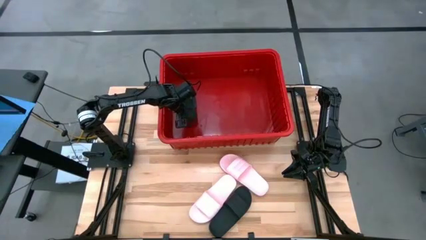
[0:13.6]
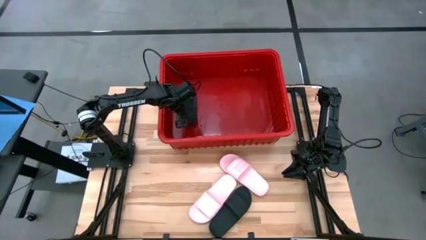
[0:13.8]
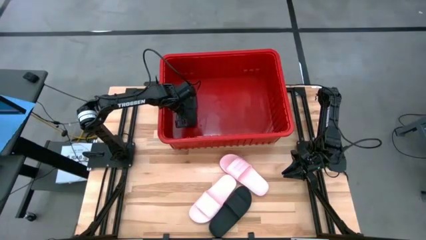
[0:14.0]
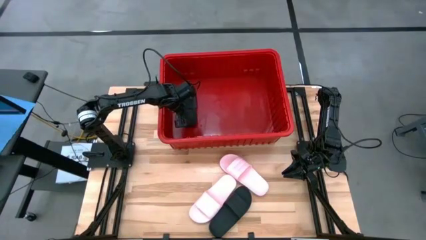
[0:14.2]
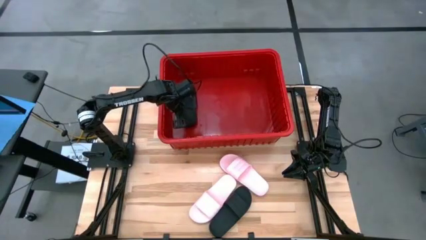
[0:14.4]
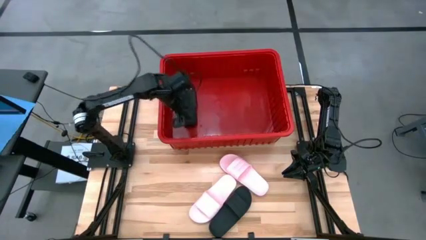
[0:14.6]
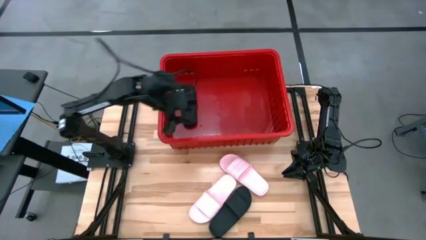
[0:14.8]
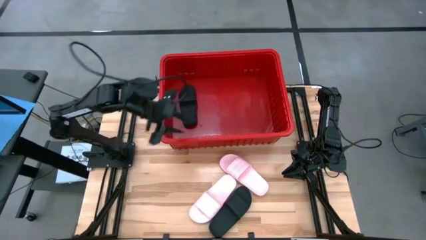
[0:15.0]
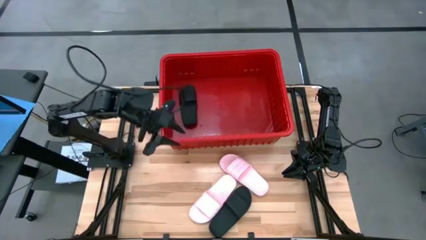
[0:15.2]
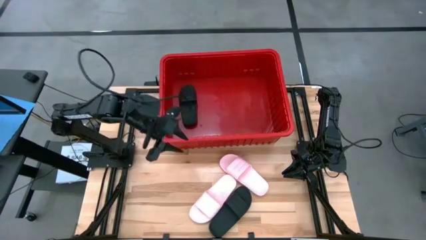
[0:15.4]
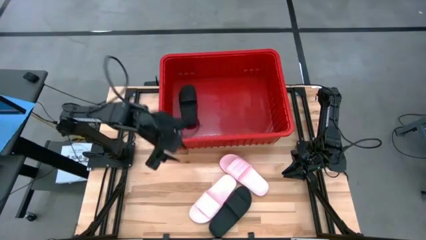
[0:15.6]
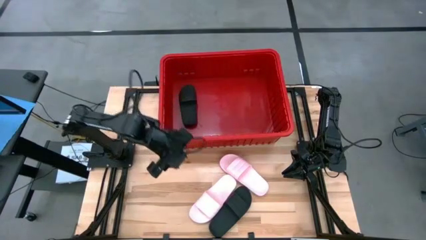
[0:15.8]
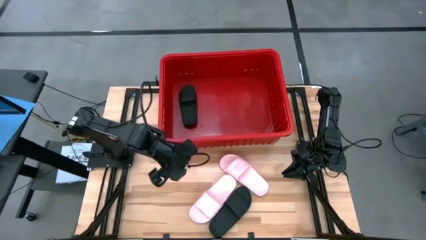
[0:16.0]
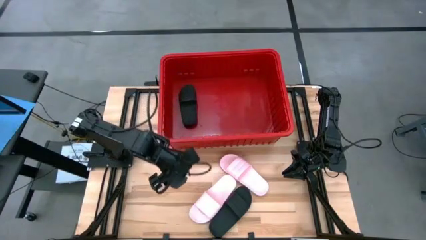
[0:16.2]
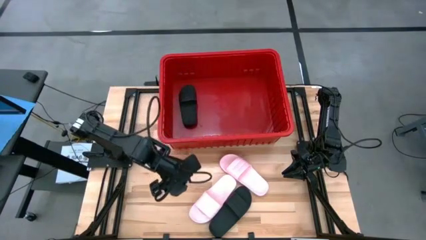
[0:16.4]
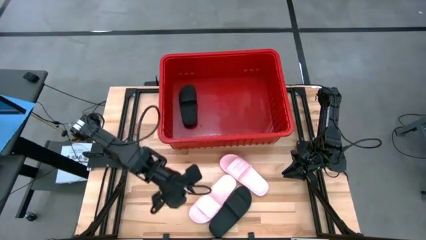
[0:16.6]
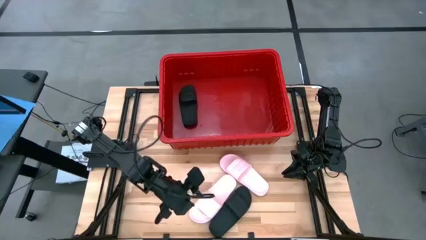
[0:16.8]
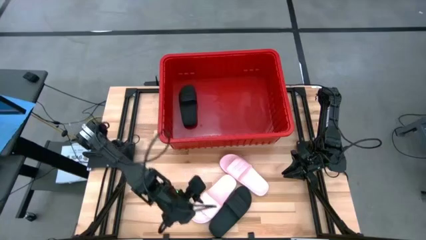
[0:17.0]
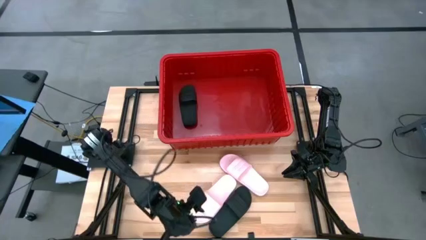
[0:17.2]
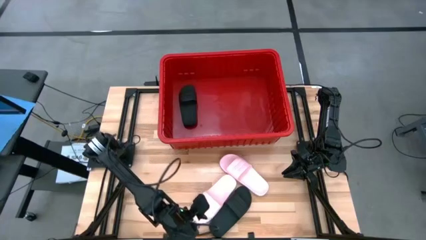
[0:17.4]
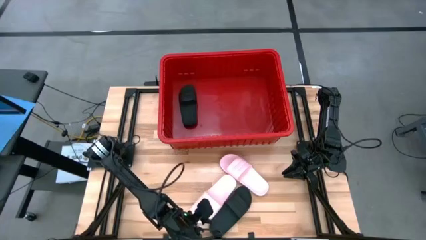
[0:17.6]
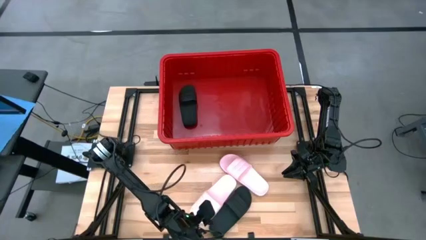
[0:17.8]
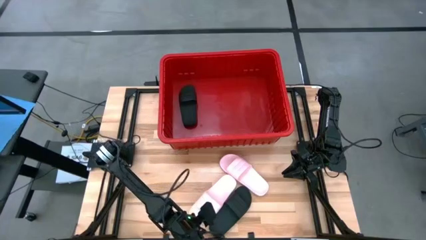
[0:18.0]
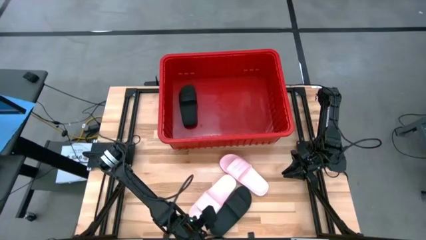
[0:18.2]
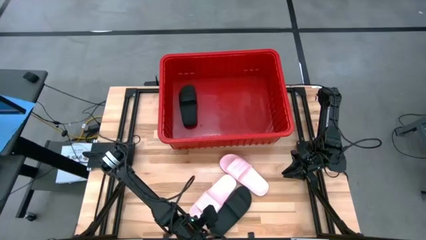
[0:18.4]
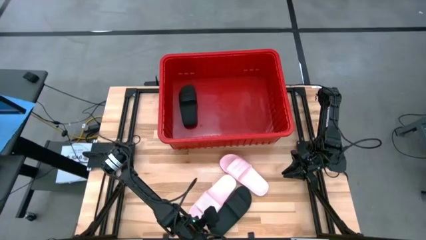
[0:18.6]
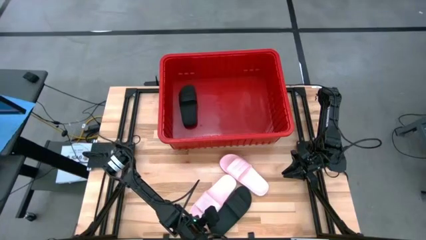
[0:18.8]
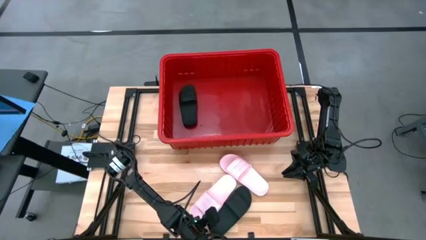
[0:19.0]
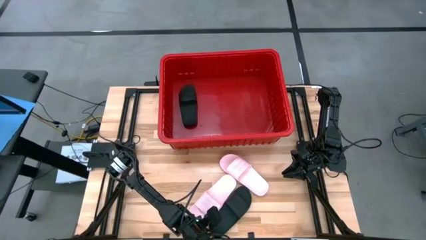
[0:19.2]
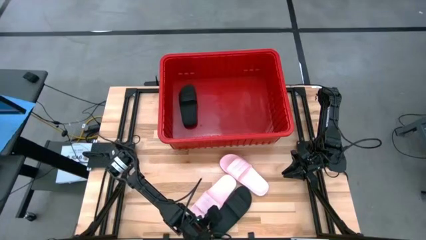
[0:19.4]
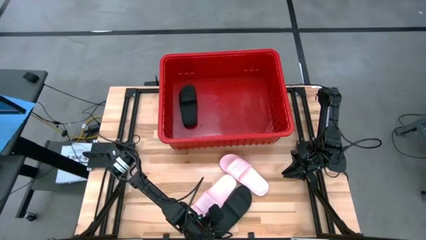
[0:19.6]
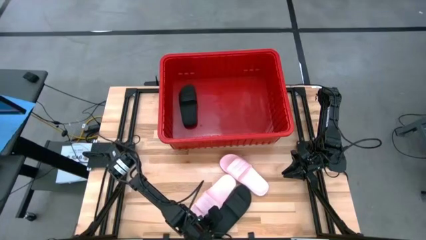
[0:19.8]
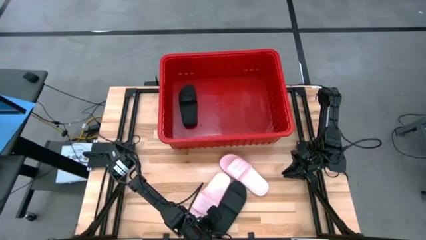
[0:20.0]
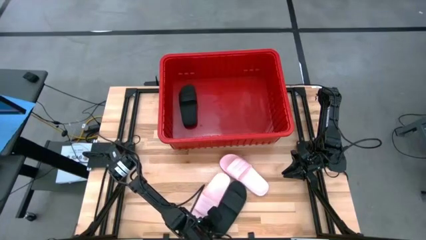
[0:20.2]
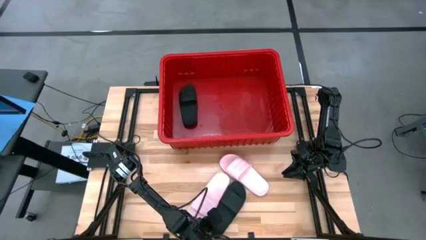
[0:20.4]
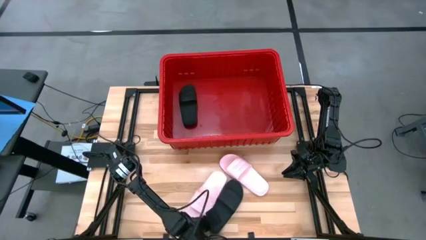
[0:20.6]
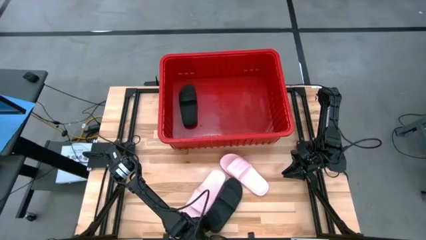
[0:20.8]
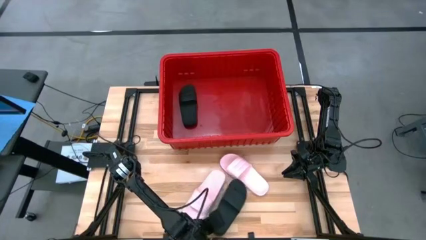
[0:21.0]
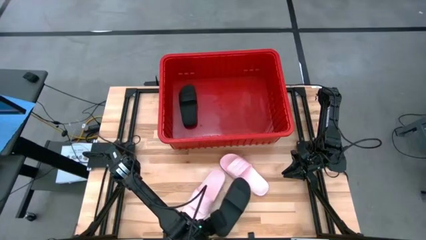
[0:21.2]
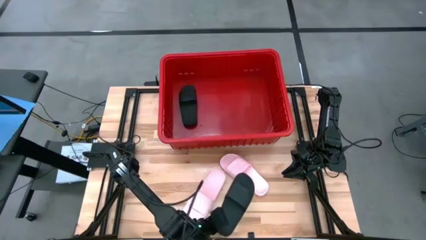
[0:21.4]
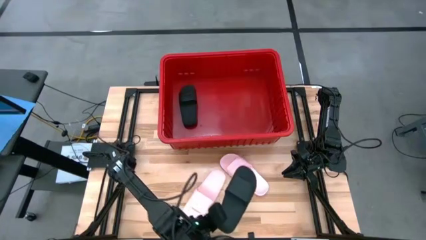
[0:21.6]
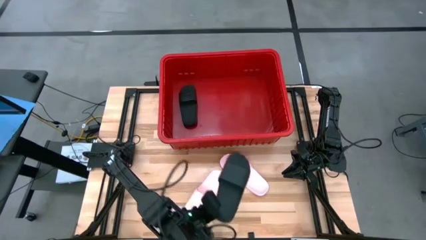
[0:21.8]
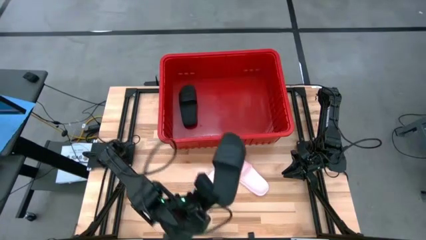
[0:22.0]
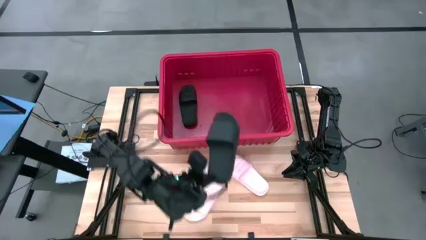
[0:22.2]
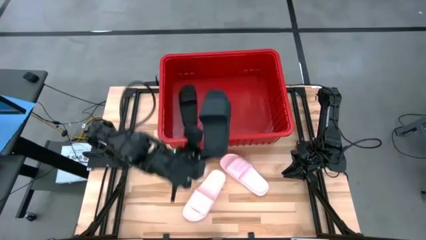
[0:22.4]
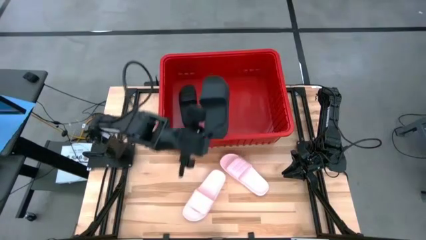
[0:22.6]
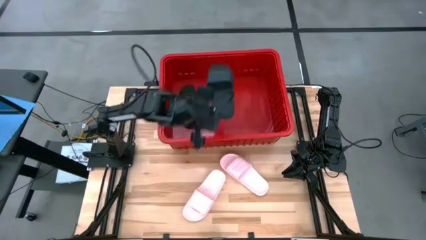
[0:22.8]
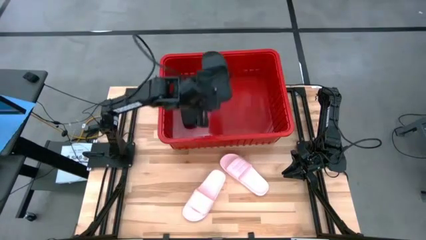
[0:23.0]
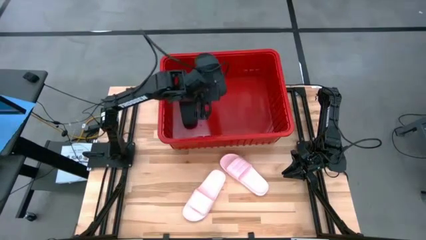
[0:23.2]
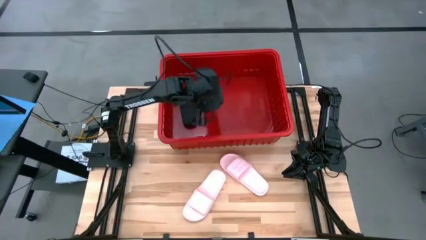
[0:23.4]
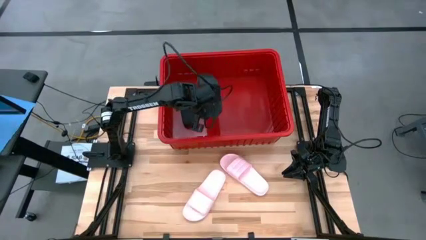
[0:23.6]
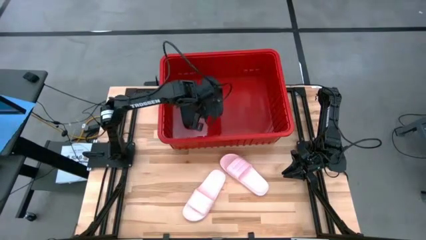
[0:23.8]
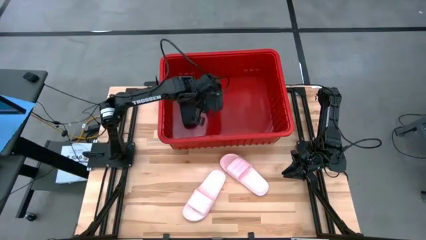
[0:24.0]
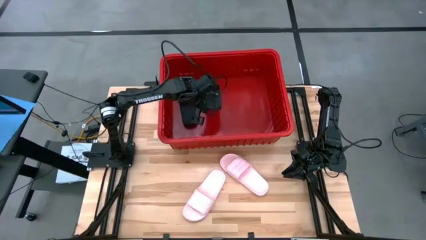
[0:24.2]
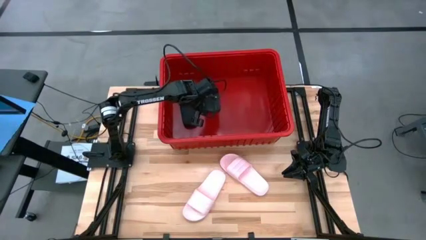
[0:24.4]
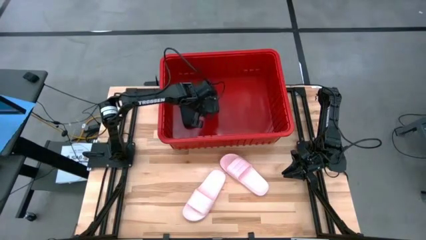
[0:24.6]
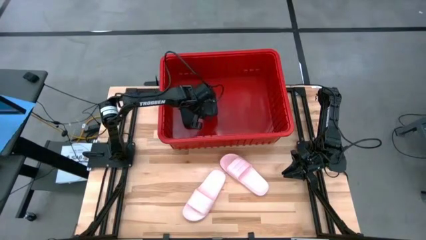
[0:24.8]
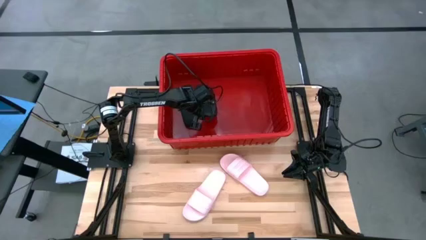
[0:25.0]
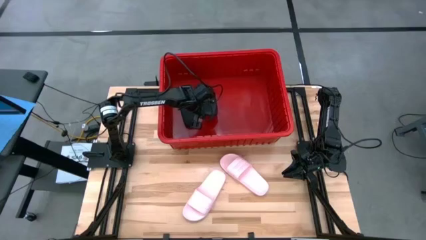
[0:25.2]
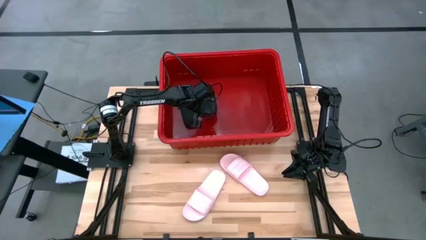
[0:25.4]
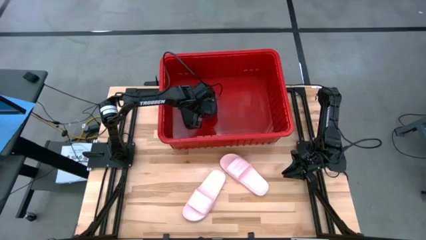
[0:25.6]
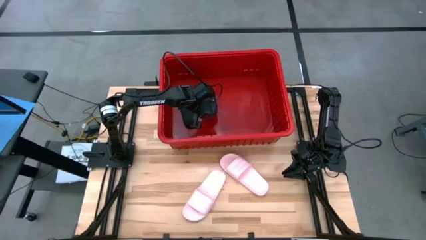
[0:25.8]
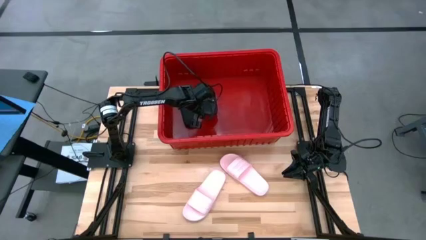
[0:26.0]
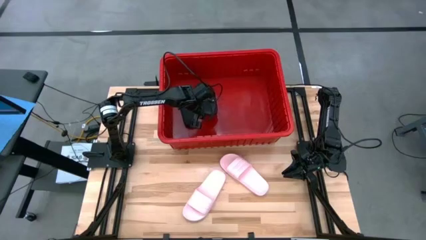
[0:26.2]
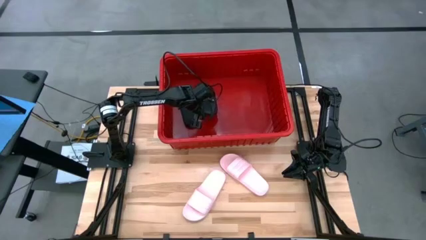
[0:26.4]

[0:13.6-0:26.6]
Task: Pick and place slides into bin
Put the black slide into the basket

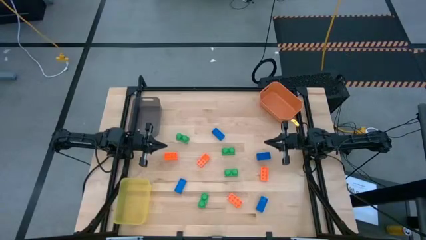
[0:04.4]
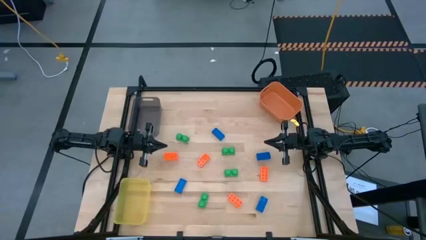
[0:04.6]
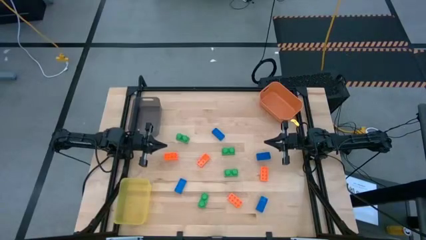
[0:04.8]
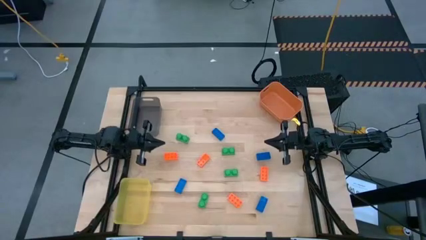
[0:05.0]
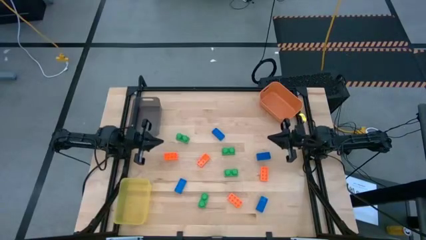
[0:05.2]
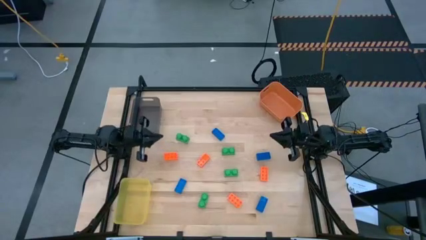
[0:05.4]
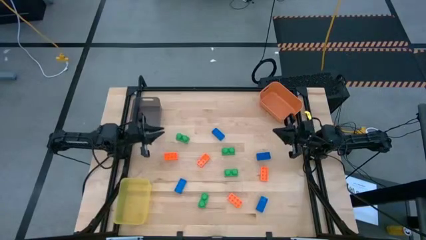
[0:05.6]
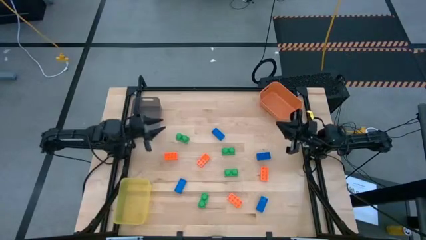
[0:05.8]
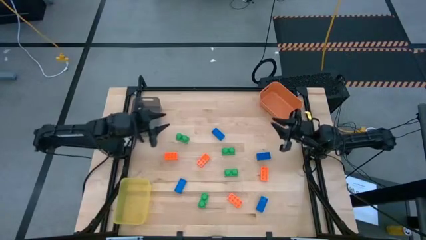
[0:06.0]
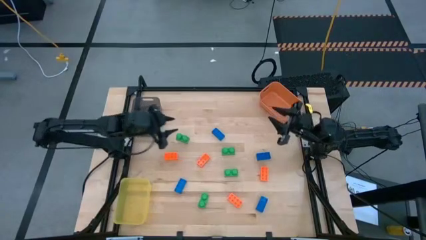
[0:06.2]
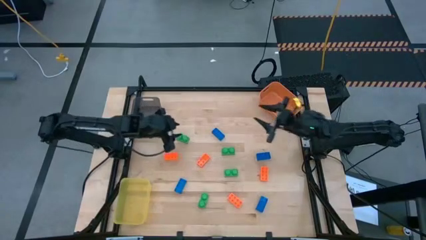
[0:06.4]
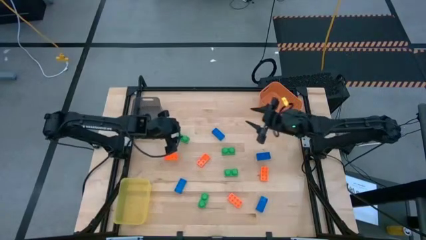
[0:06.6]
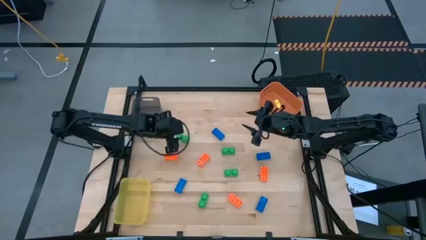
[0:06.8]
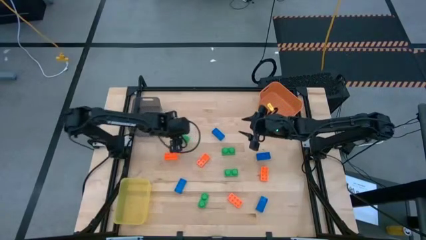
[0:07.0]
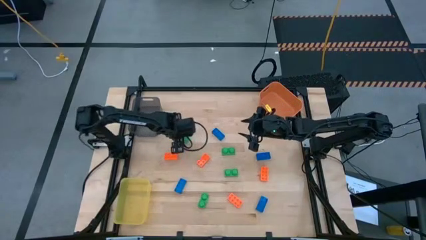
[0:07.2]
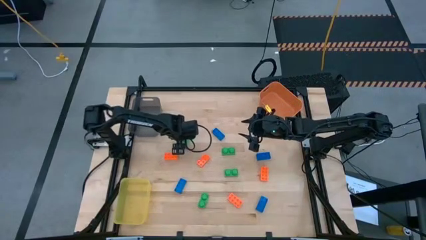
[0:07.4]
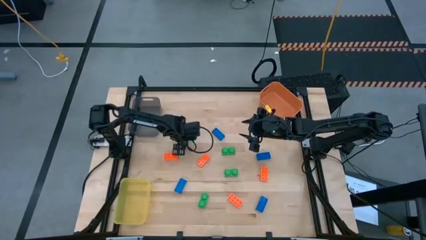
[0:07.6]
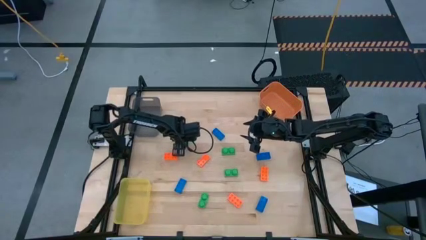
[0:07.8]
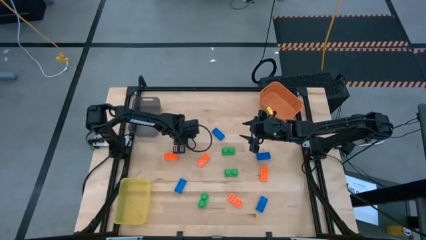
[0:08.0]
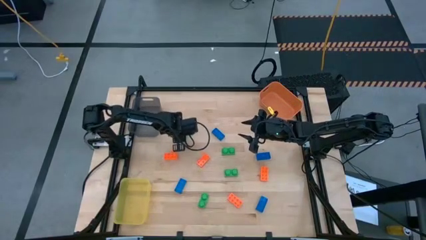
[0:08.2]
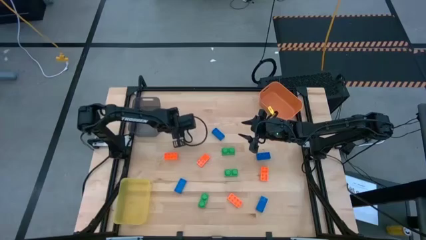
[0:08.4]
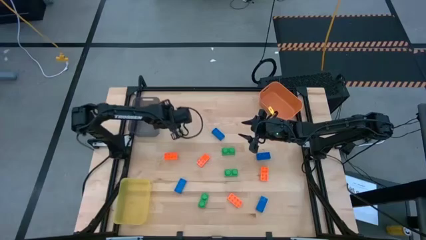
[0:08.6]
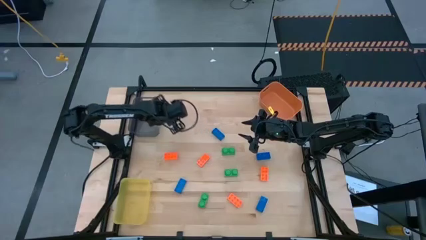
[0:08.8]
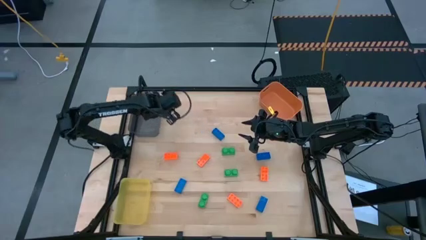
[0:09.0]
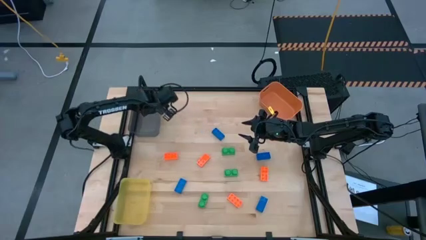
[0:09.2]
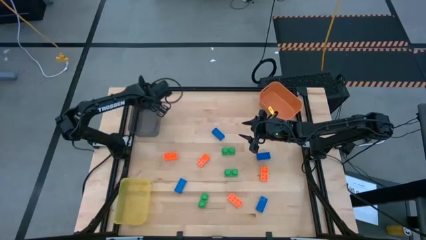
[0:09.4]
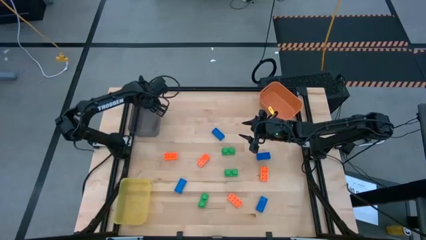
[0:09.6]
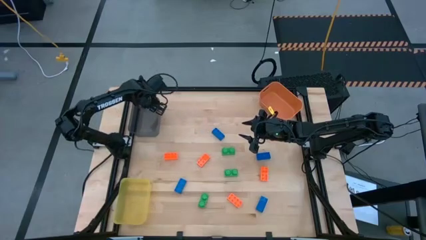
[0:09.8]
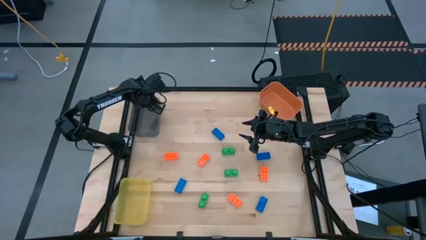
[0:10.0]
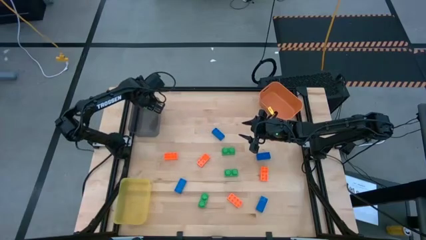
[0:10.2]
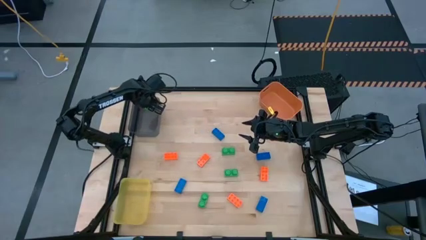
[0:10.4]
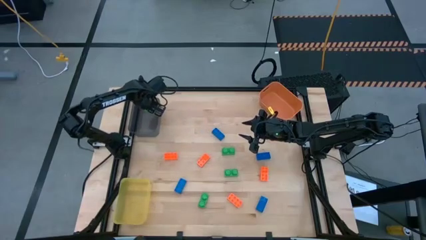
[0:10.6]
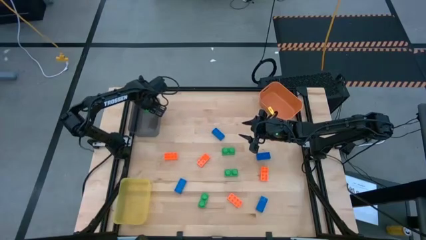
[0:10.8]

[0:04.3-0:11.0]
Task: Sort & place blocks by color
Put the green game piece into the black bin
